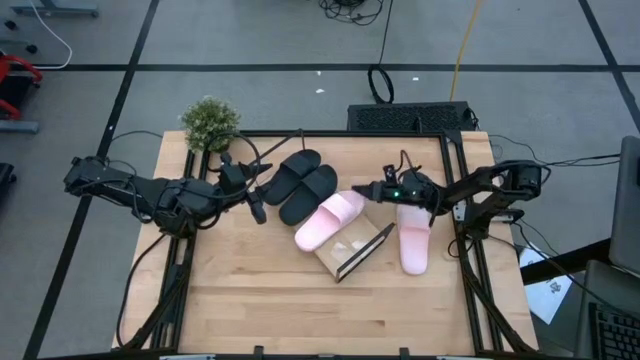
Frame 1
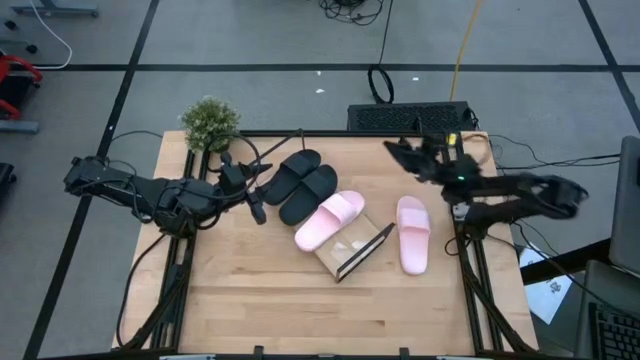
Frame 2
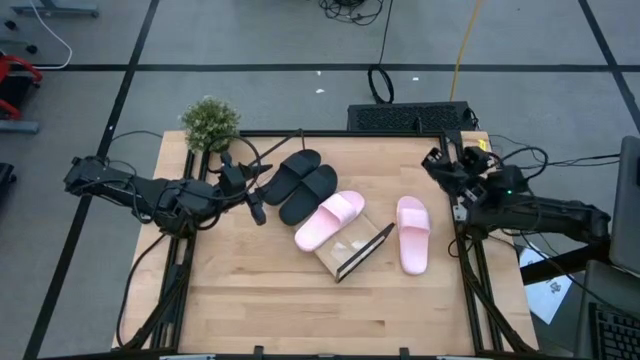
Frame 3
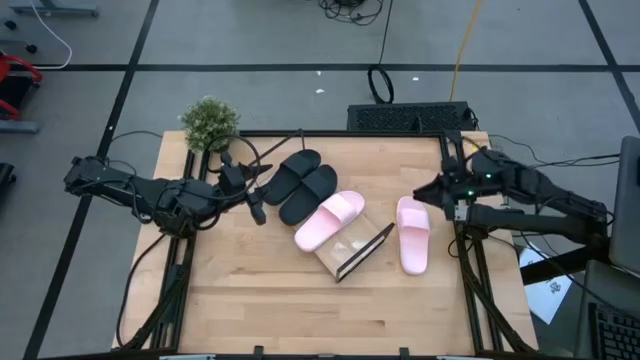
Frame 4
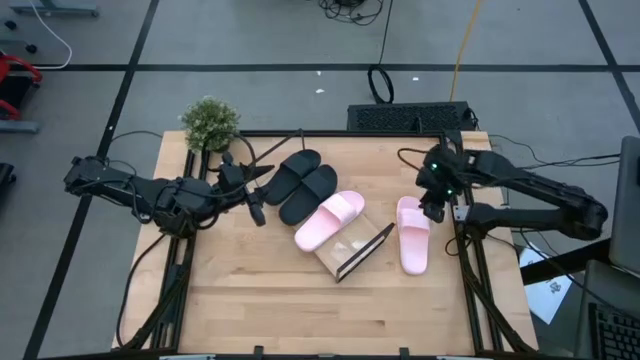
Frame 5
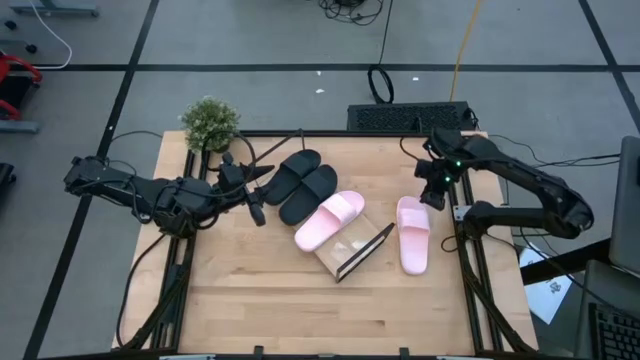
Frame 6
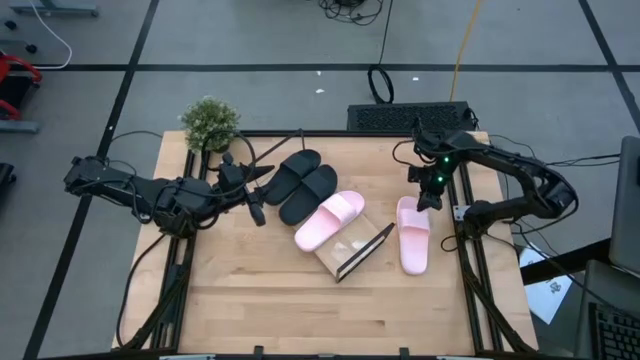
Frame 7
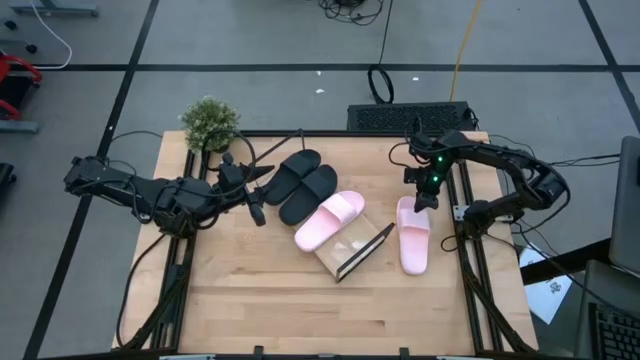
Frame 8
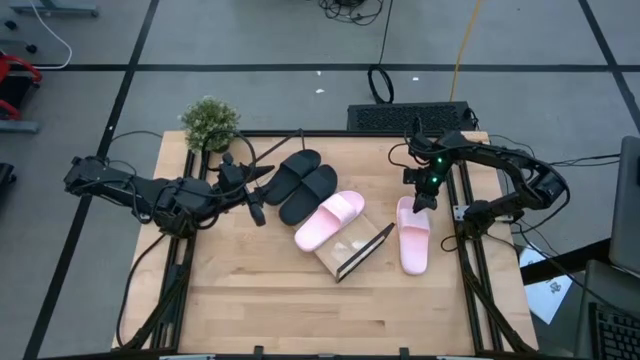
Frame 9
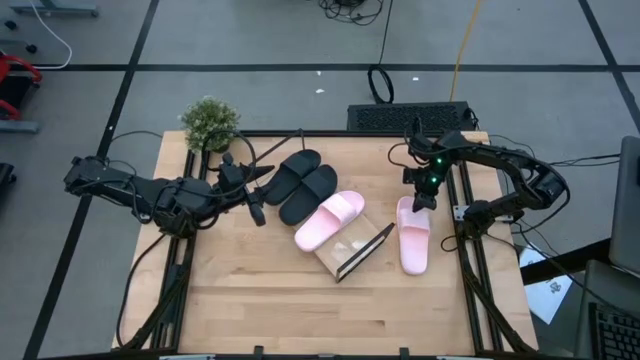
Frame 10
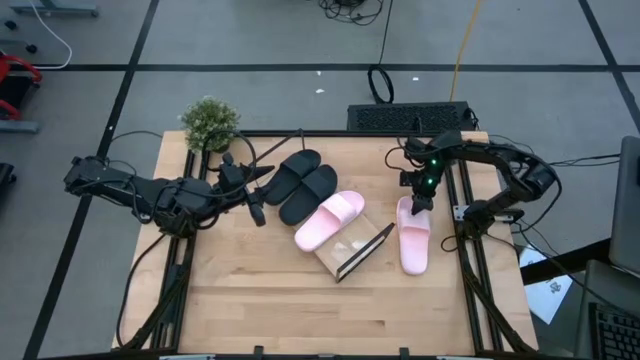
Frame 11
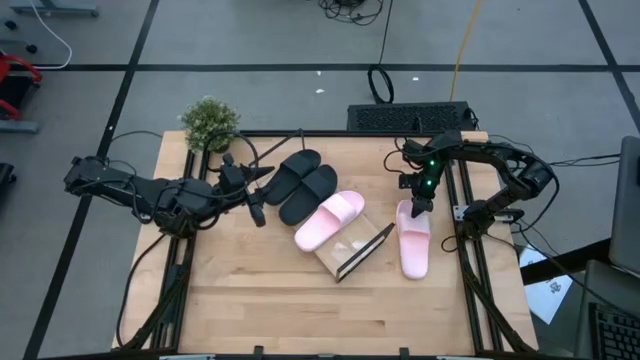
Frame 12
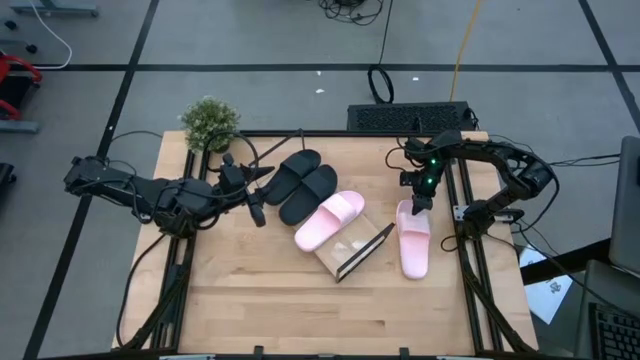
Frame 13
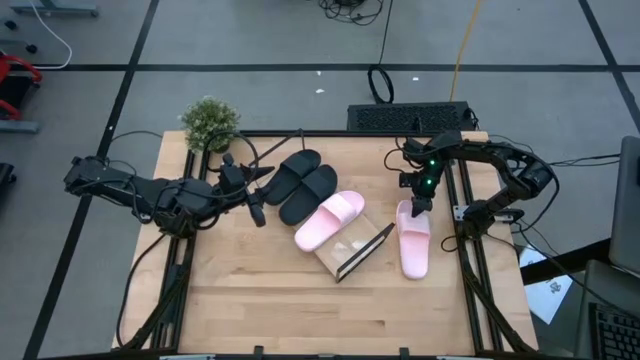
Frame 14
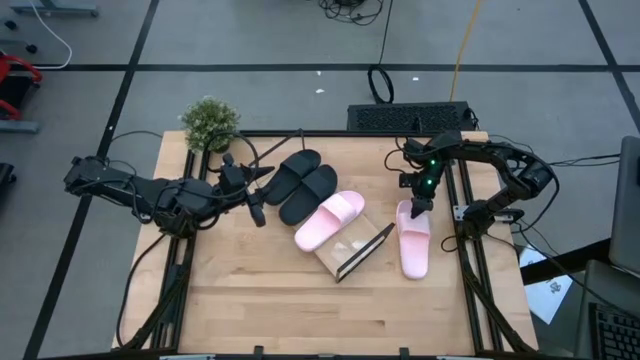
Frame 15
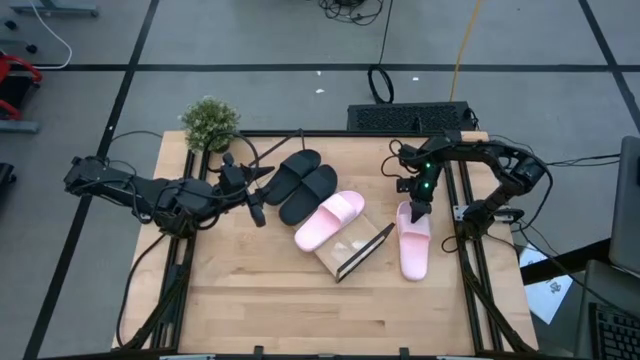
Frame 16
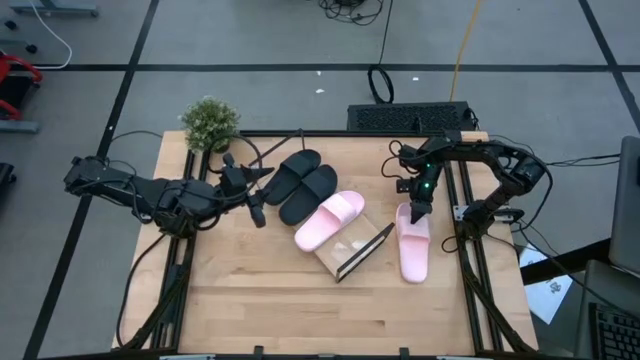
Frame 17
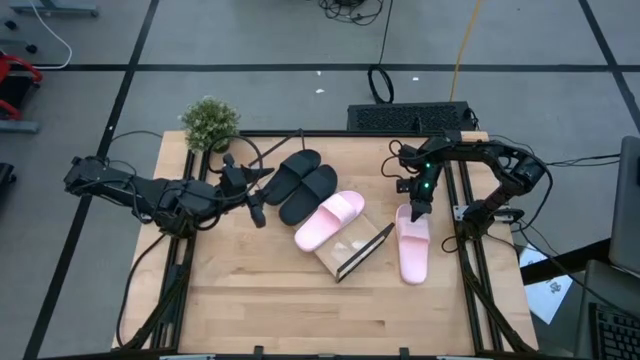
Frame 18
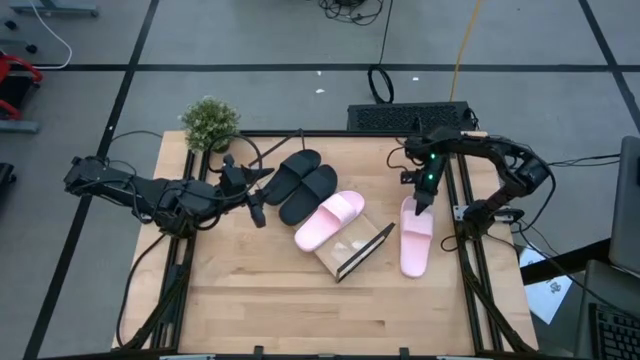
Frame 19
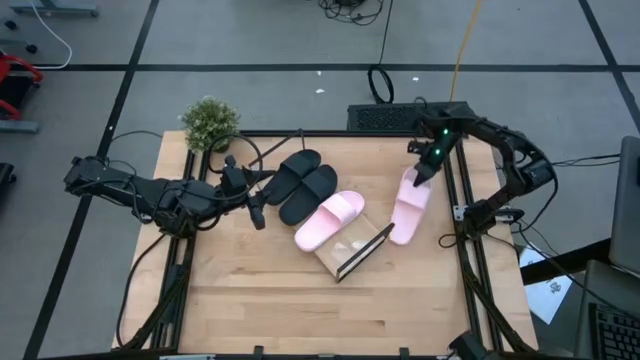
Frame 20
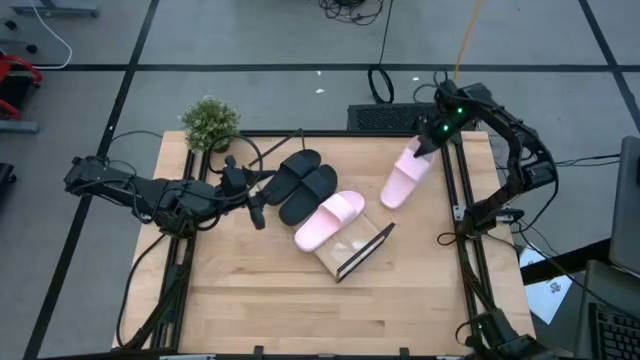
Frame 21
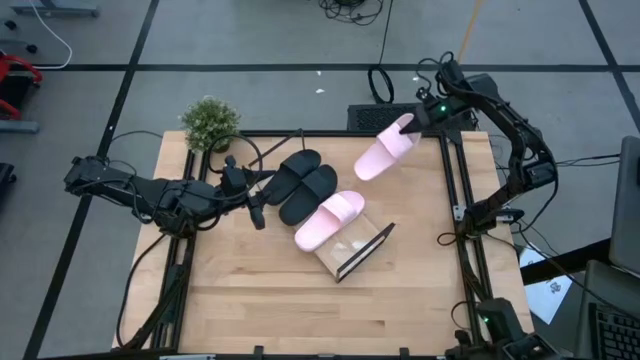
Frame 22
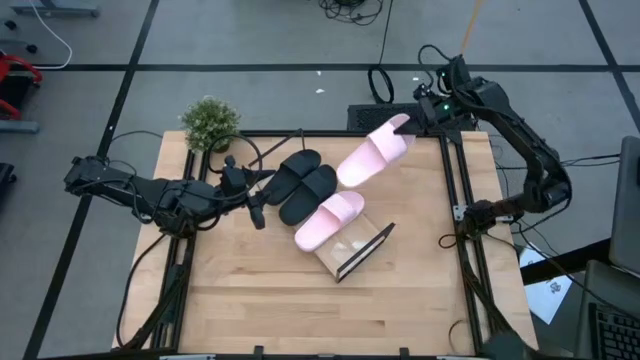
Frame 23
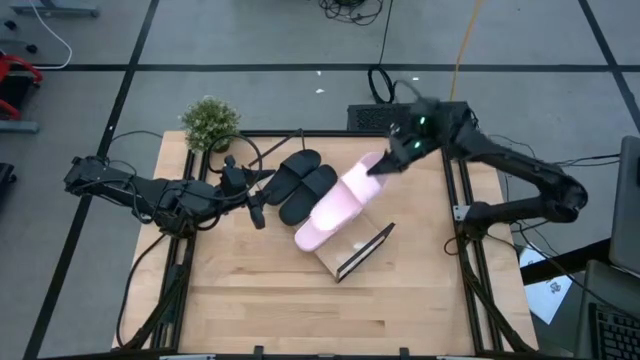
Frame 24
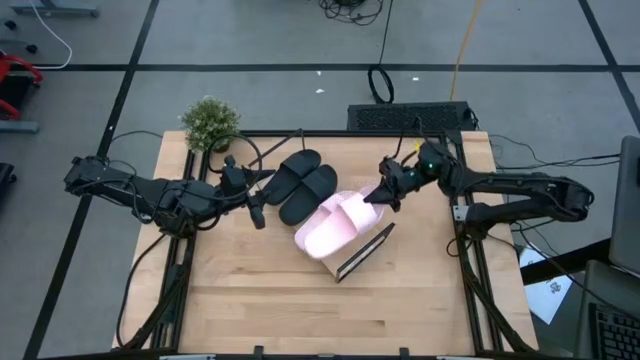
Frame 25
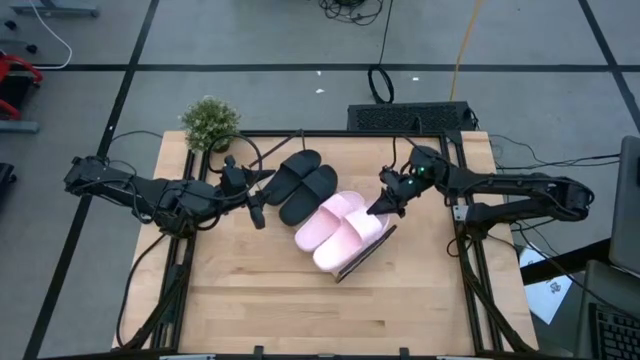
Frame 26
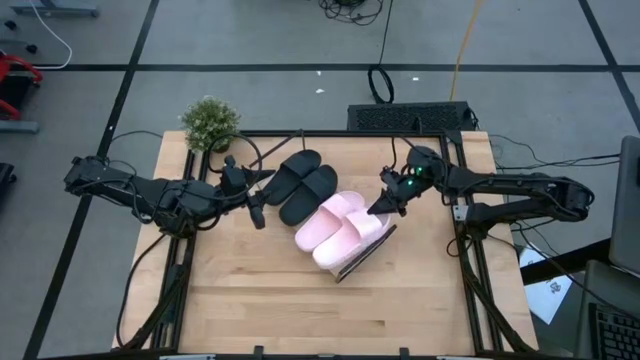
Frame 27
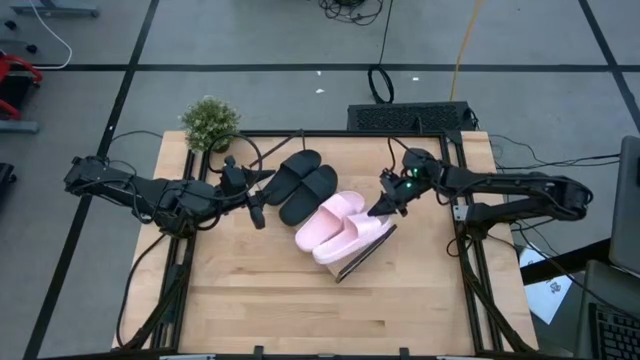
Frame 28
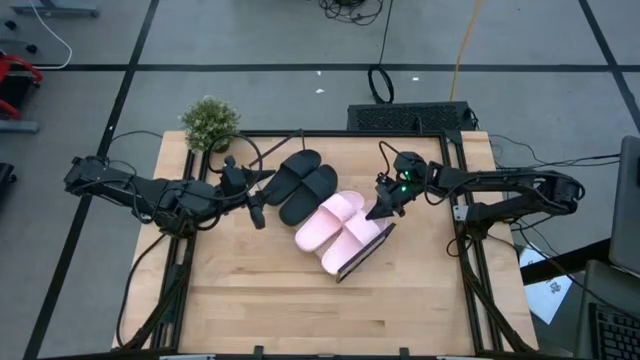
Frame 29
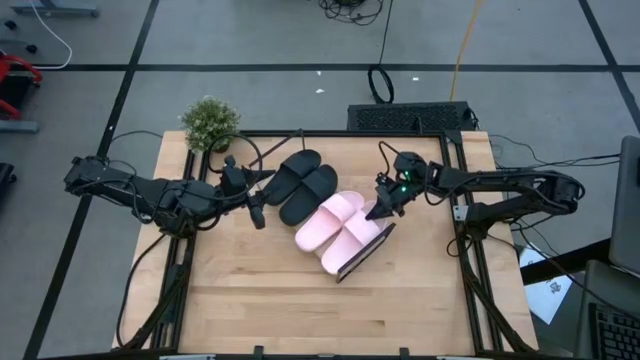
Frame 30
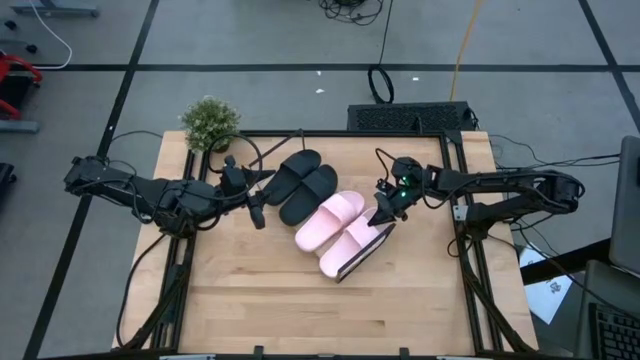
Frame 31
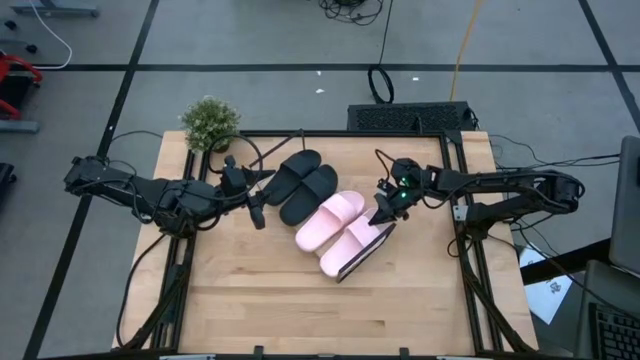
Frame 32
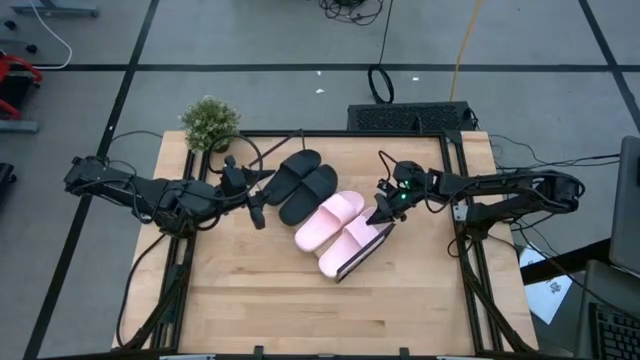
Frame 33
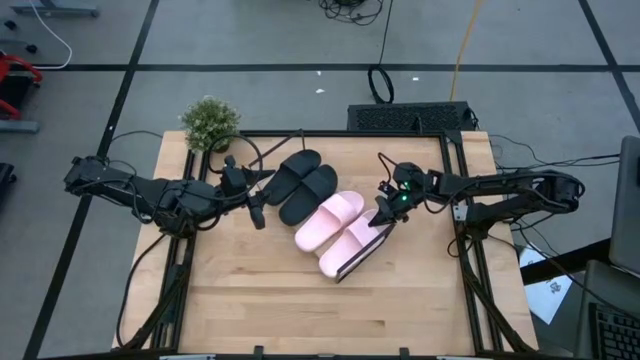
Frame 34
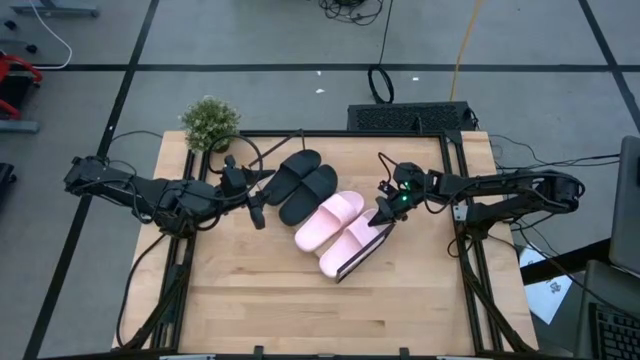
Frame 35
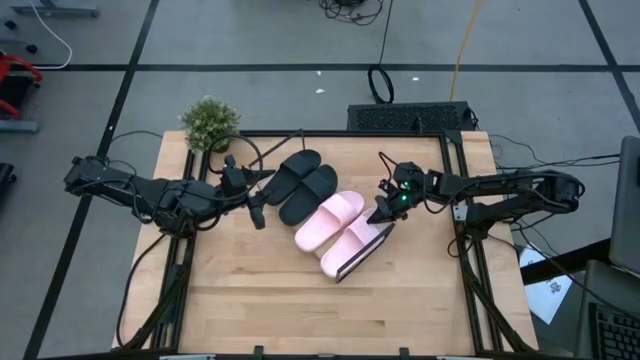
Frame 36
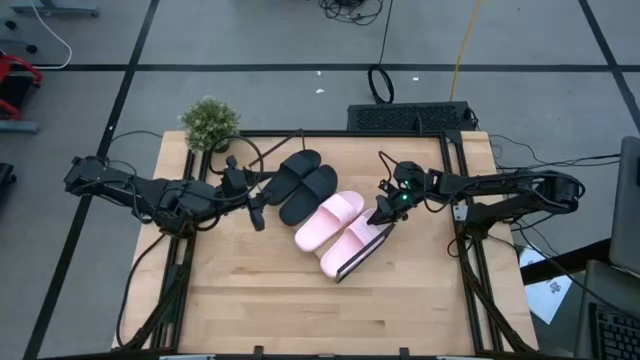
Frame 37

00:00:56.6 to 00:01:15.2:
Task: Pick and place slides into the shelf
Put the pink slipper on the shelf

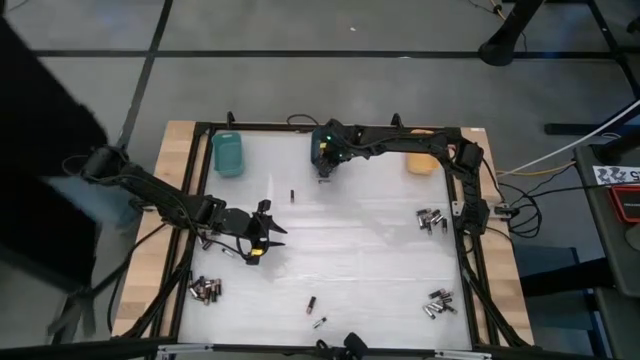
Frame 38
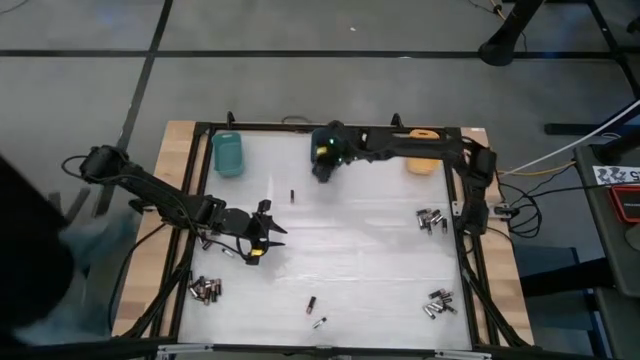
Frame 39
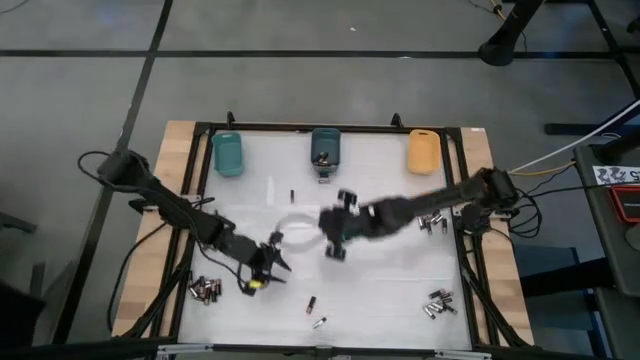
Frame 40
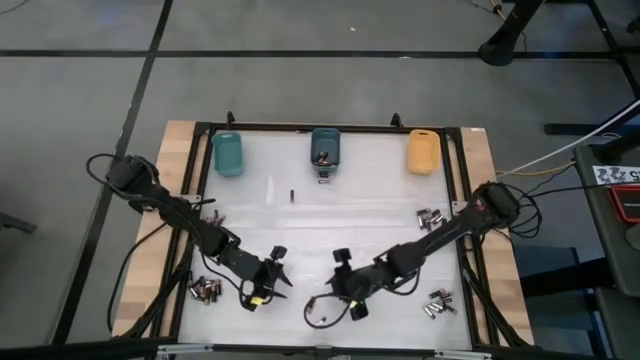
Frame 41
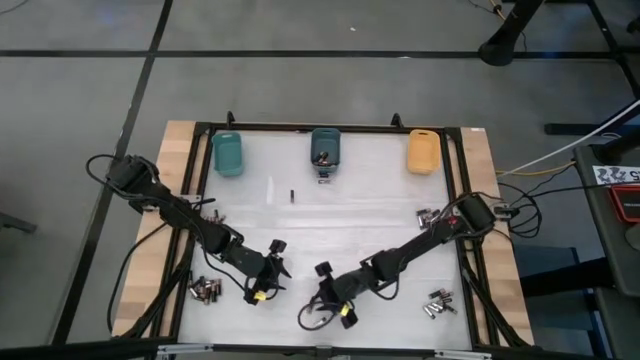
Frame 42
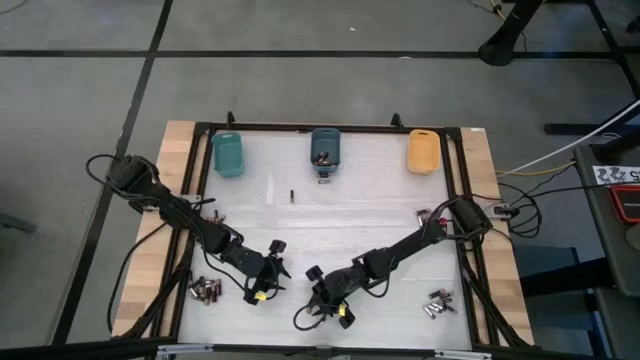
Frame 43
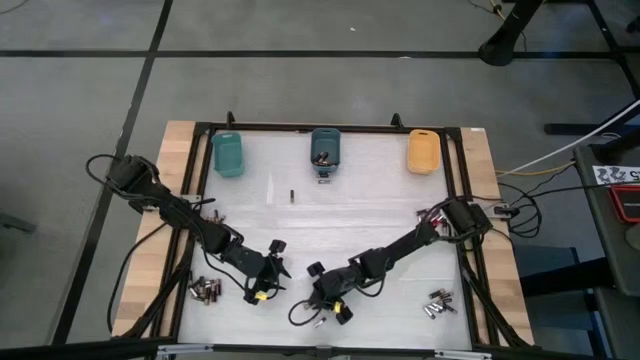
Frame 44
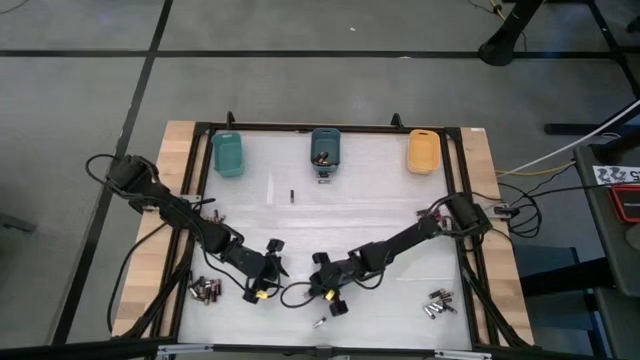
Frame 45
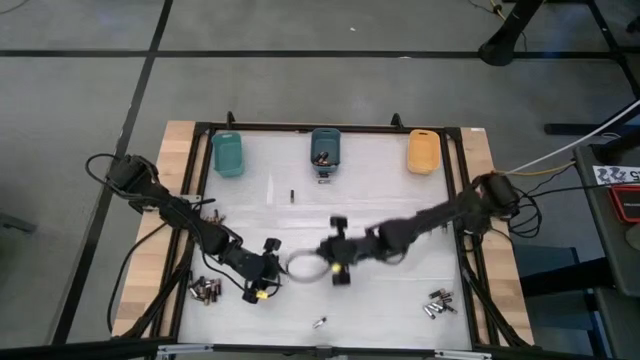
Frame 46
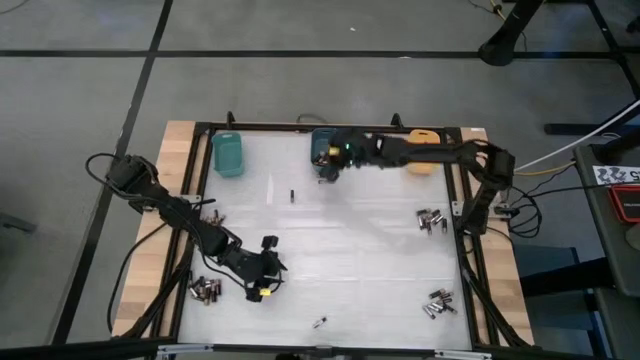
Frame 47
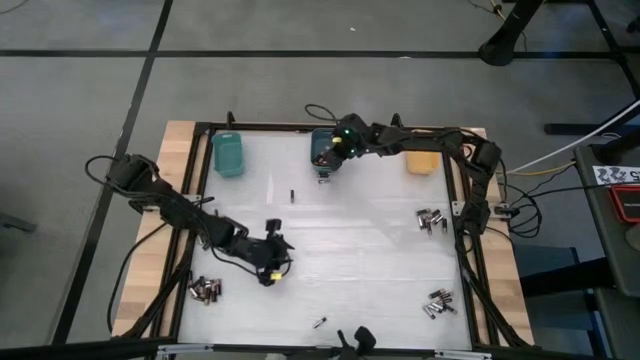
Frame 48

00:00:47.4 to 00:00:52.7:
Task: Sort batteries
Put the brown battery into the blue bin
